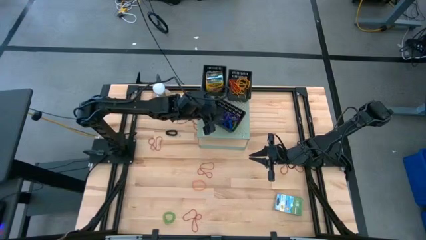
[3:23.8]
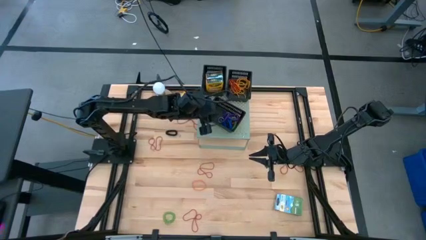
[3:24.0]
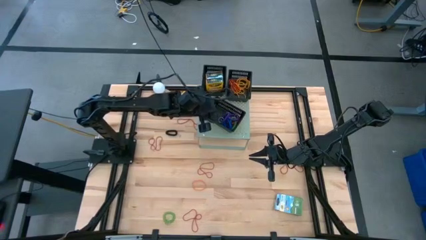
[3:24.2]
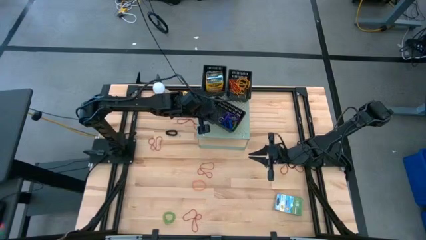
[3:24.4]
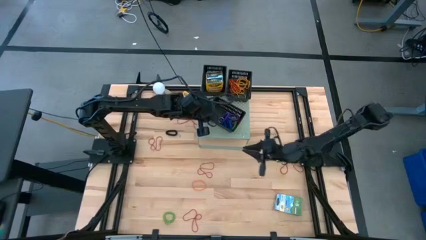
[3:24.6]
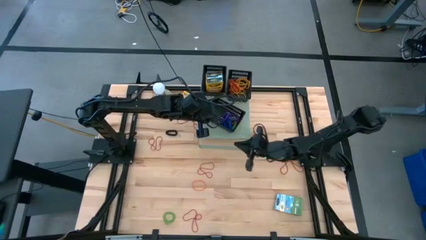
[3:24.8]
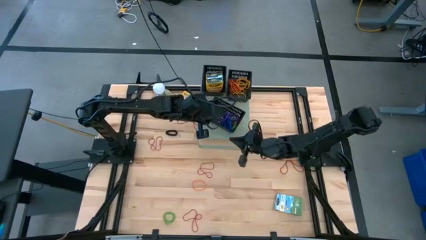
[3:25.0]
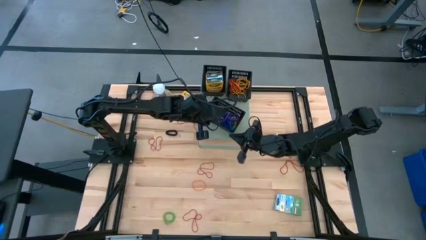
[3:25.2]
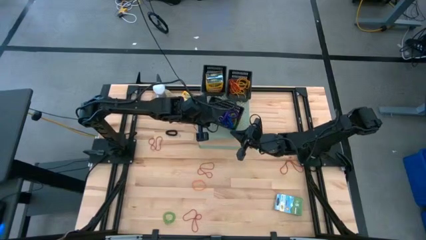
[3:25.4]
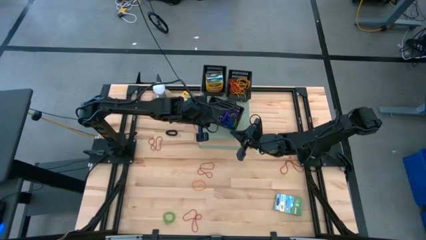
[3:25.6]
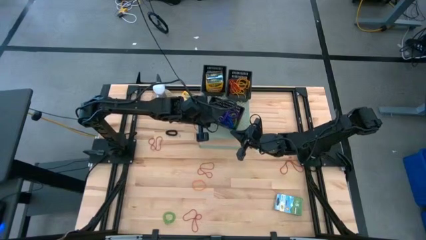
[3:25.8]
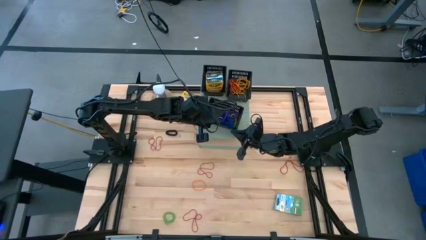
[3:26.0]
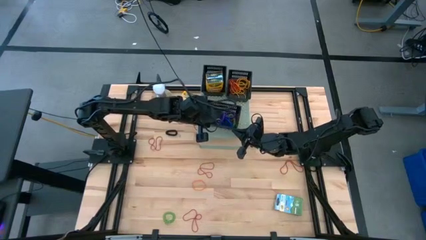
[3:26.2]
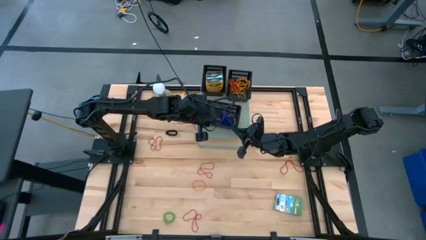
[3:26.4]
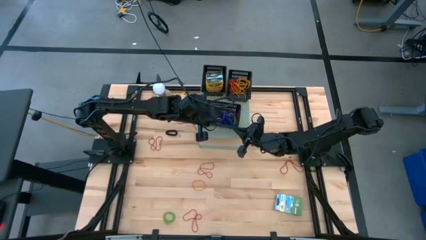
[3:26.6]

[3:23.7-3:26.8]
Task: Pick & Place Office Desk Supplies
Adjust the bottom black bin on the shelf

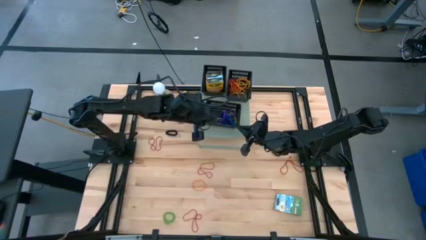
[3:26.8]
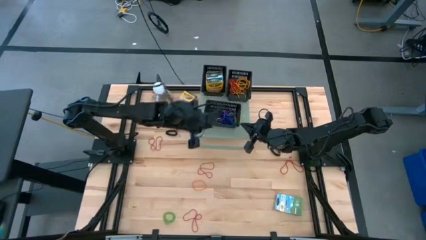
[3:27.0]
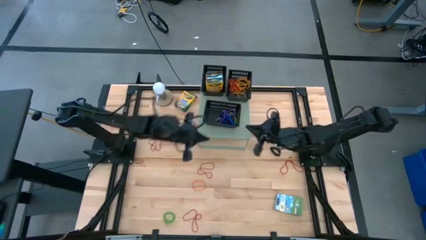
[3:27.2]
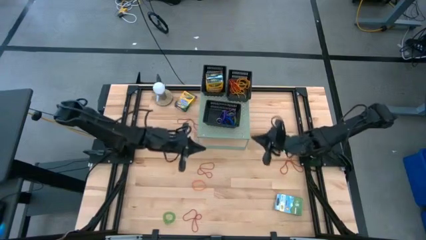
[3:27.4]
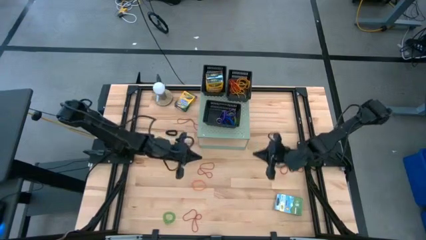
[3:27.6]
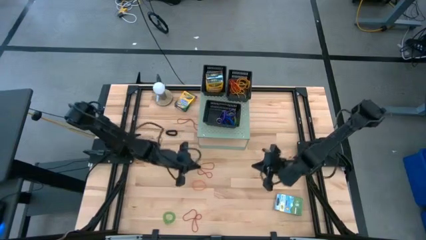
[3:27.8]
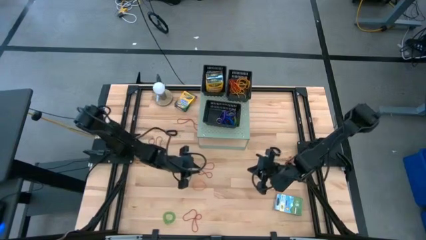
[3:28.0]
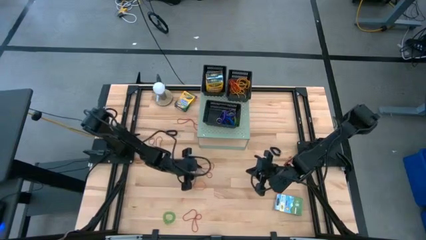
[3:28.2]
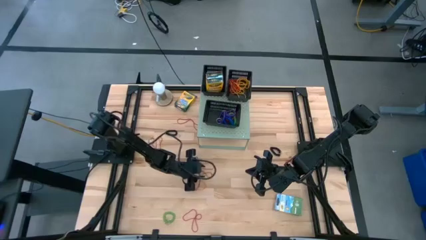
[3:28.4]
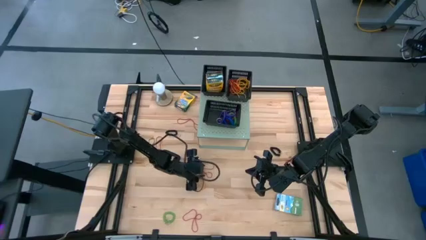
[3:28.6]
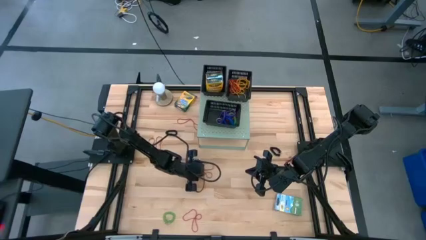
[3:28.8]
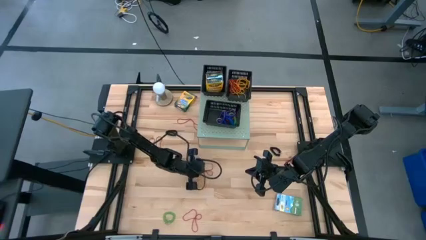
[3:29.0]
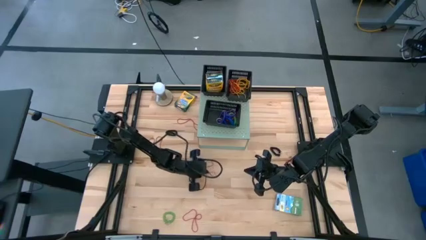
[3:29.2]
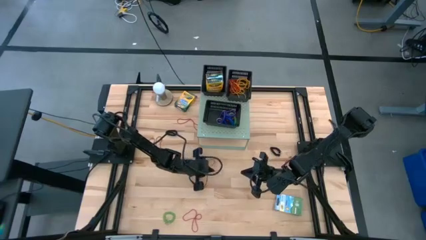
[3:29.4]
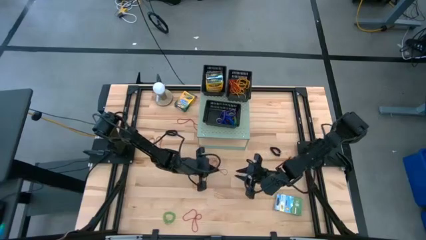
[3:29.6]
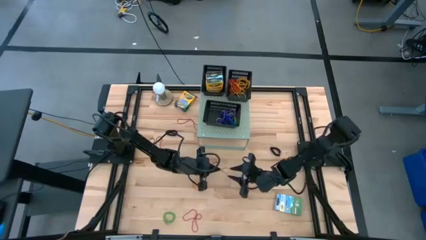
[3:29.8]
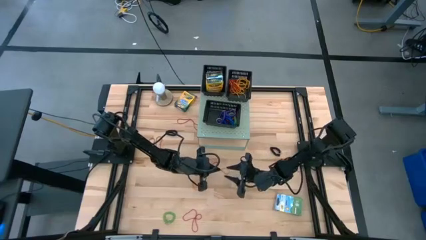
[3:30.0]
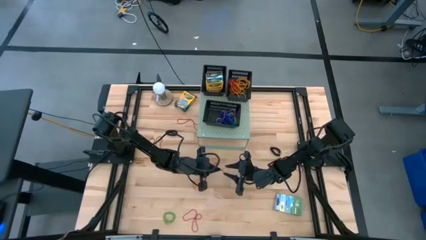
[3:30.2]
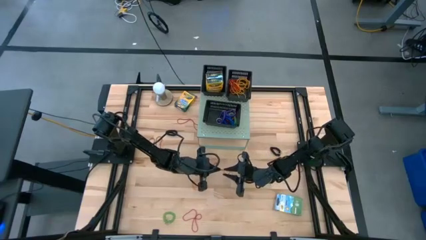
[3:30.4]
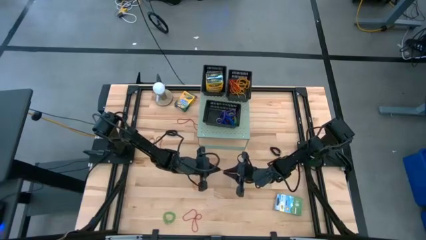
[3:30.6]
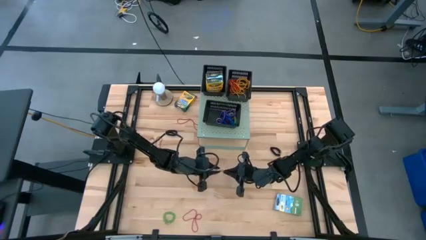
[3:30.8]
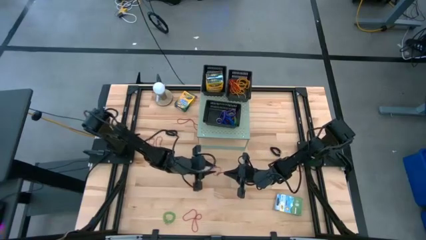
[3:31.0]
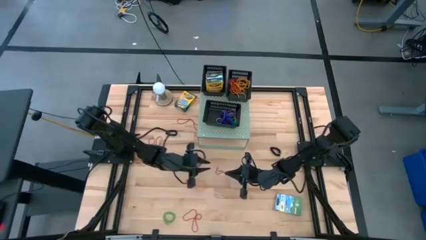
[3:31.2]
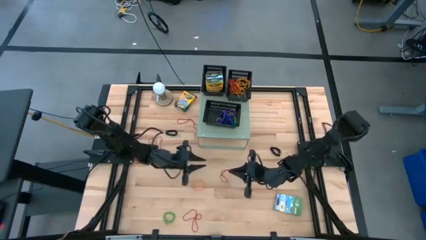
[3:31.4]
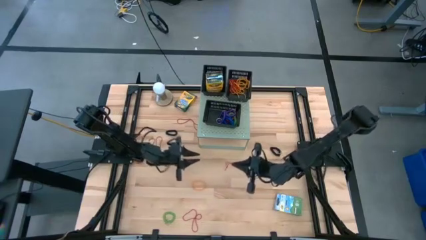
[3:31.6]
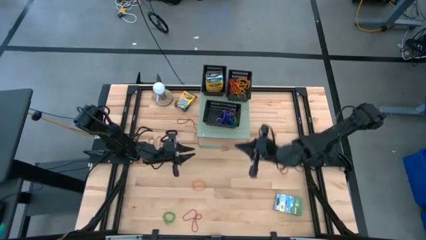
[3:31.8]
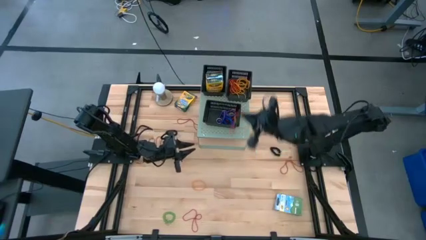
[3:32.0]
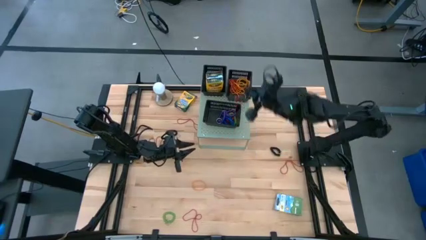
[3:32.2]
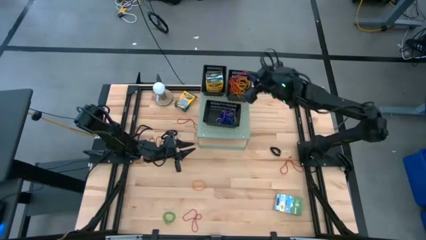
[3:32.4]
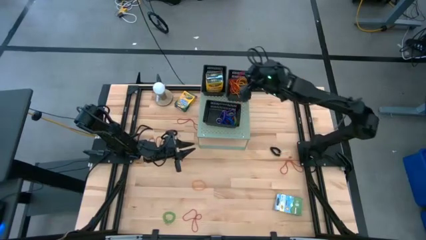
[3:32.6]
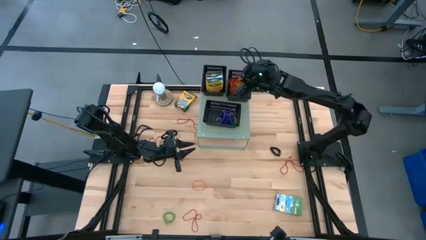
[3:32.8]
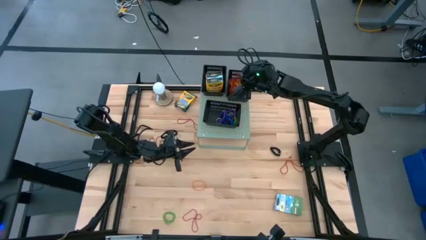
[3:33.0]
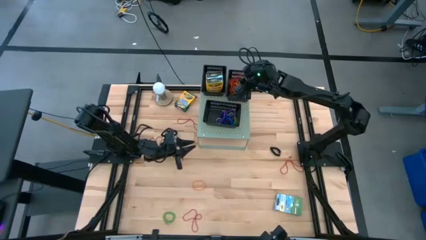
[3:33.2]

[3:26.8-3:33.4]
Put the red rubber band into the top right black bin on the shelf

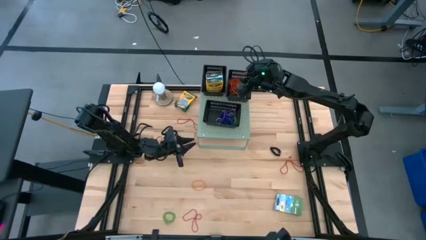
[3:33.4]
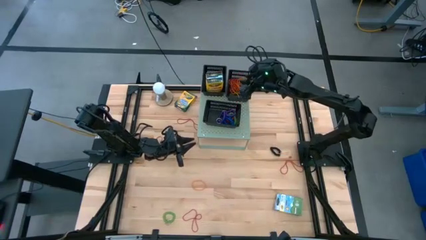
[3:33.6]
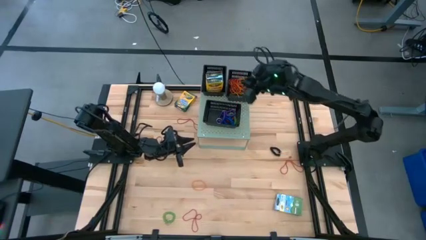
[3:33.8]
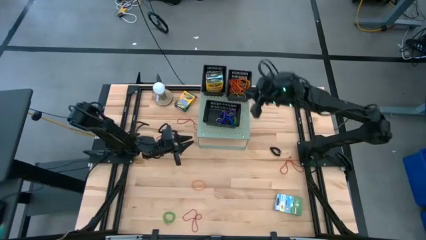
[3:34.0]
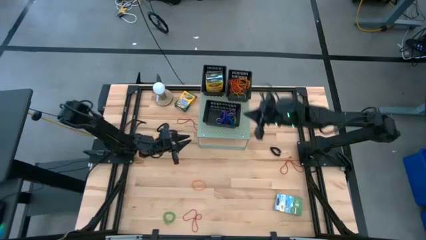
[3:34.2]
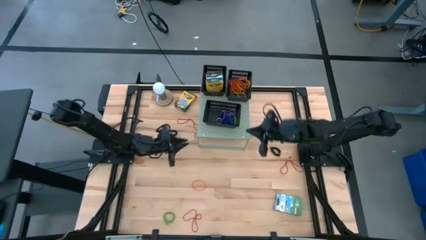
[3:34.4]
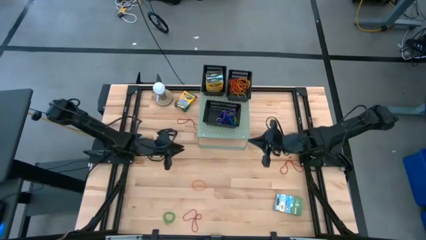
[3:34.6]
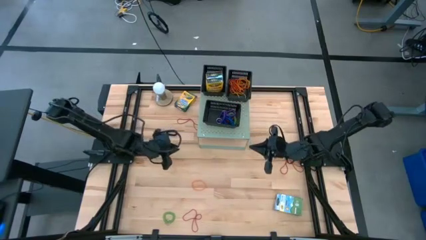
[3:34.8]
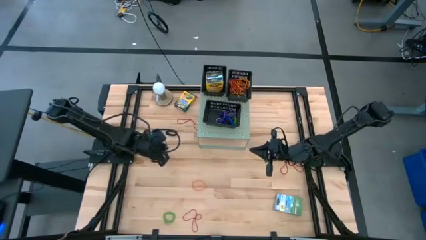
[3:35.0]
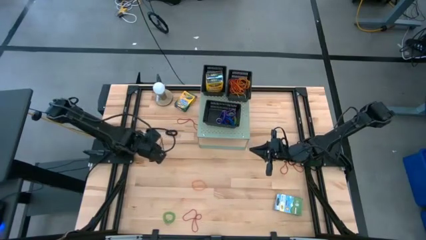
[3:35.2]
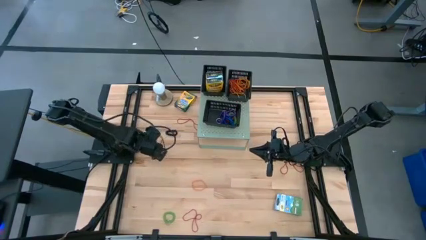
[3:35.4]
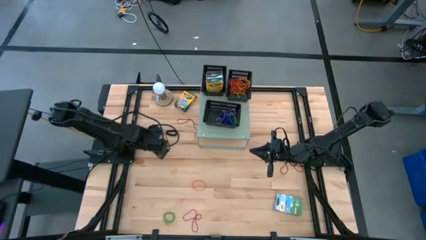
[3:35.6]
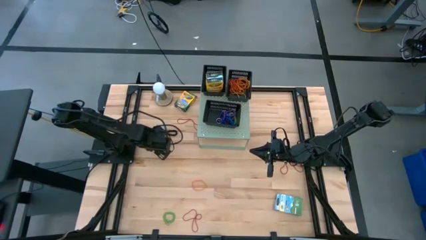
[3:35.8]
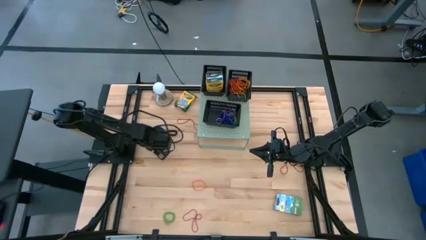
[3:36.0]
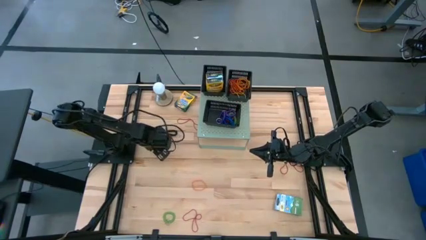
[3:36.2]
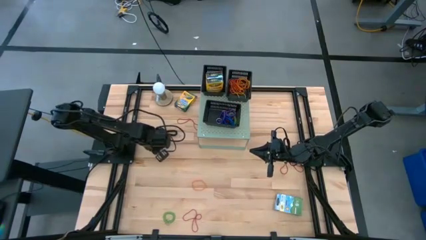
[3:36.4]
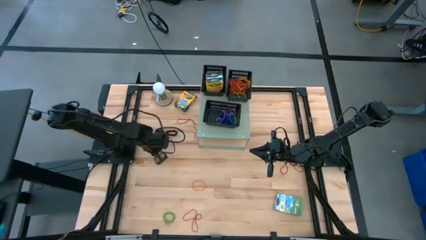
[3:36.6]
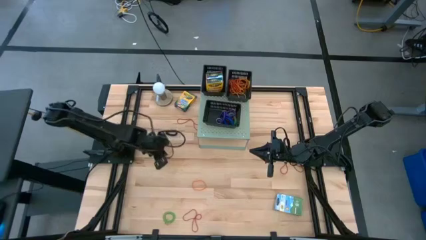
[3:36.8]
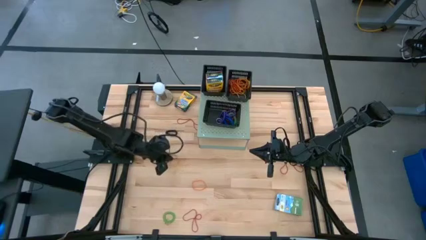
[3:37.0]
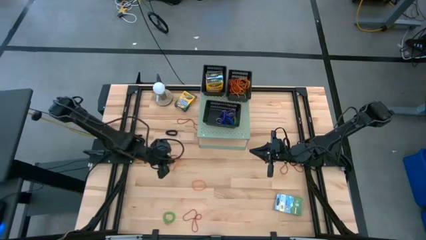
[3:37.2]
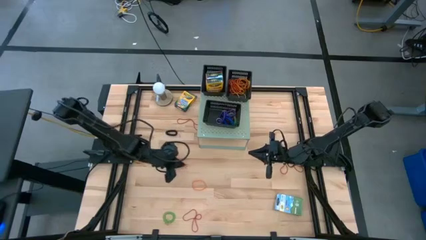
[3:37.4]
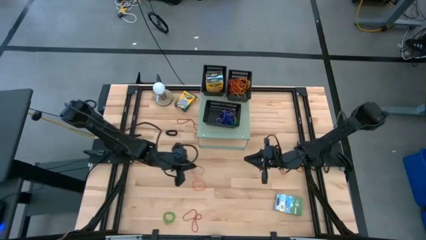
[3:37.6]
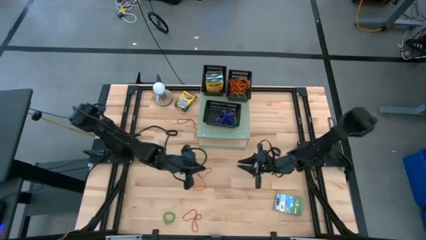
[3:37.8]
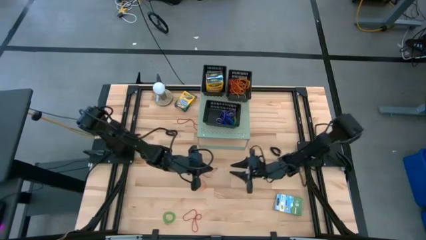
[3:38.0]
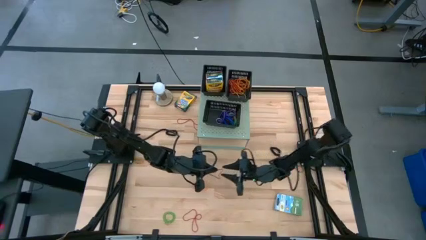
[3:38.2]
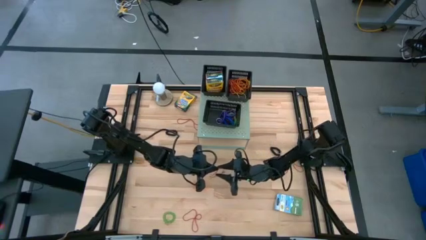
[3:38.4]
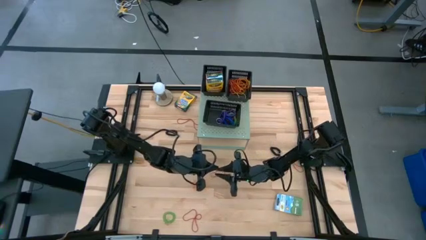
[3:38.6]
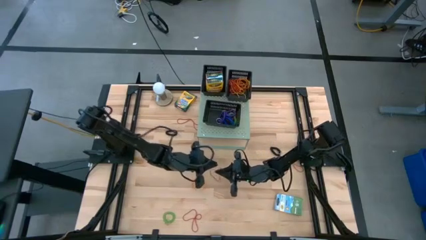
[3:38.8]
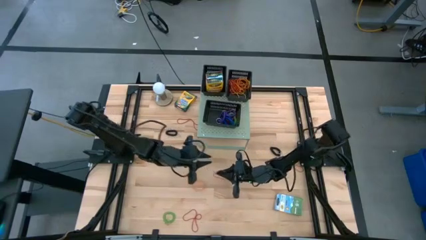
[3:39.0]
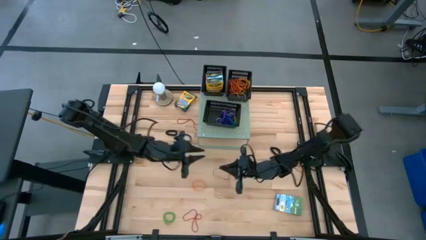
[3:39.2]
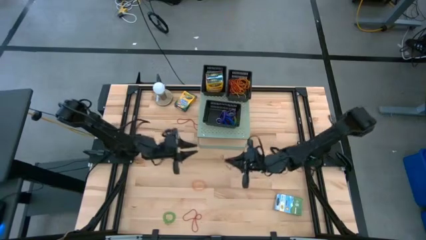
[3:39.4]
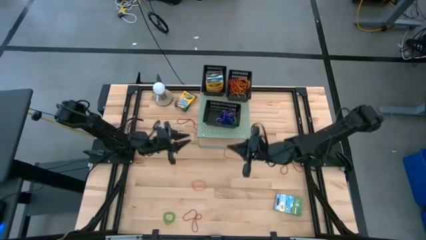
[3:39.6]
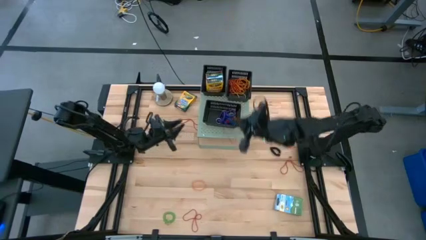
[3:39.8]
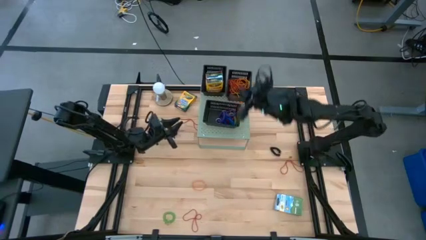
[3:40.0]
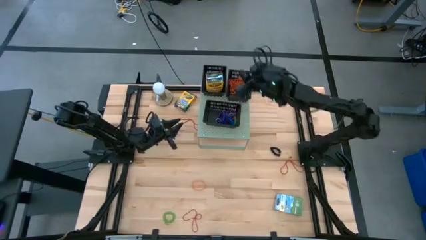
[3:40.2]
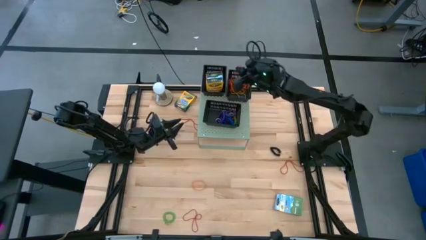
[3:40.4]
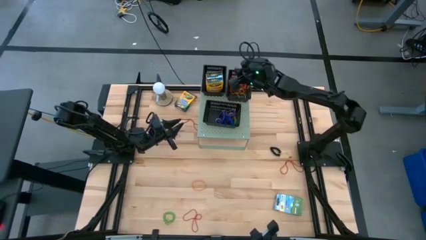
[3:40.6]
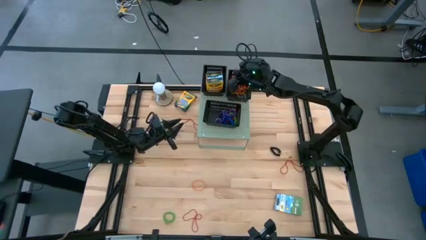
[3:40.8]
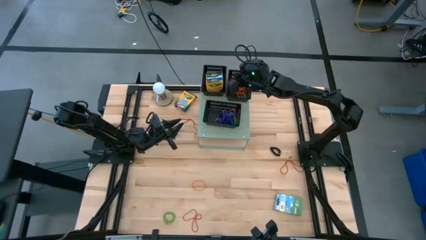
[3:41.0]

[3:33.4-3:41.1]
Put the red rubber band into the top right black bin on the shelf
